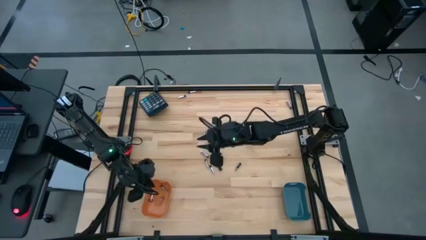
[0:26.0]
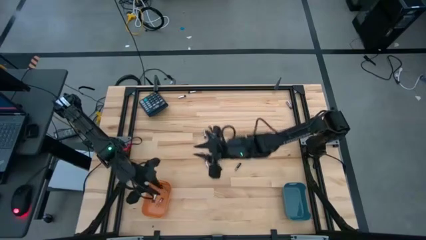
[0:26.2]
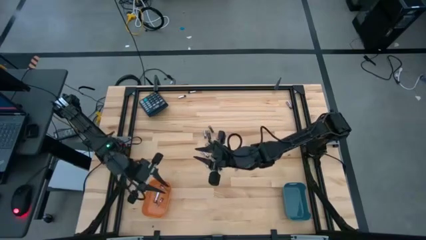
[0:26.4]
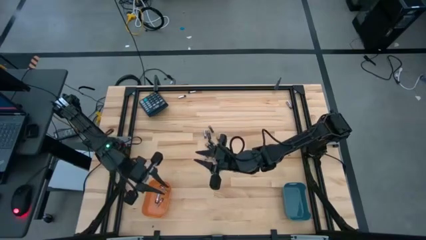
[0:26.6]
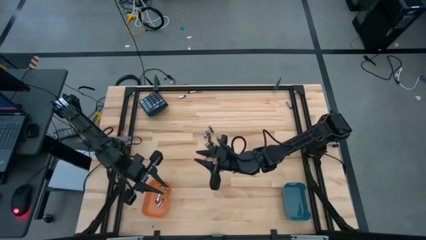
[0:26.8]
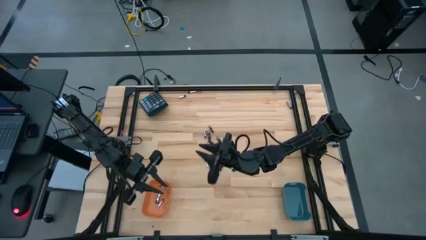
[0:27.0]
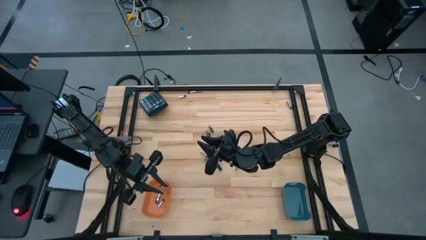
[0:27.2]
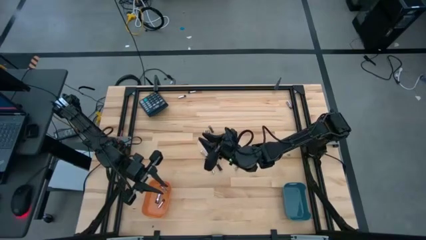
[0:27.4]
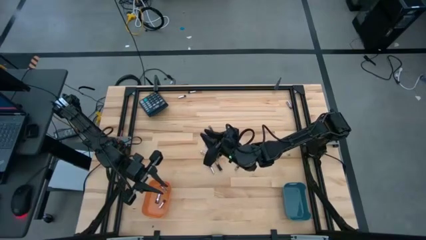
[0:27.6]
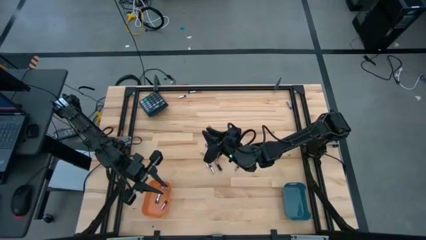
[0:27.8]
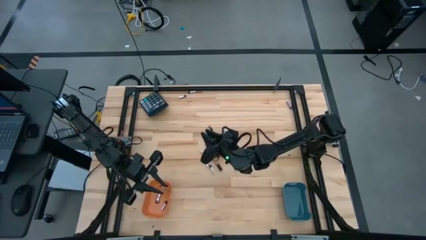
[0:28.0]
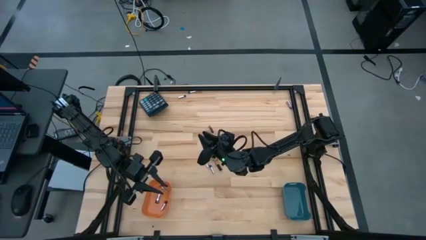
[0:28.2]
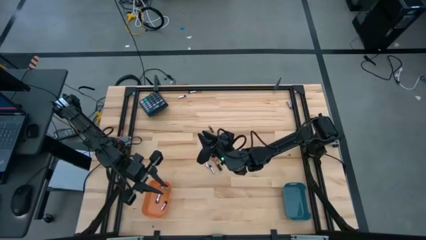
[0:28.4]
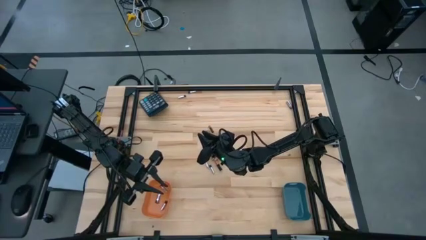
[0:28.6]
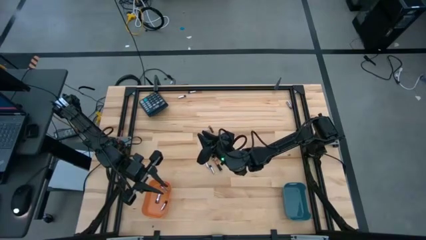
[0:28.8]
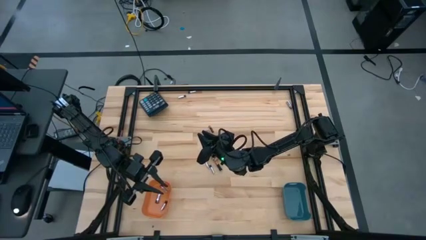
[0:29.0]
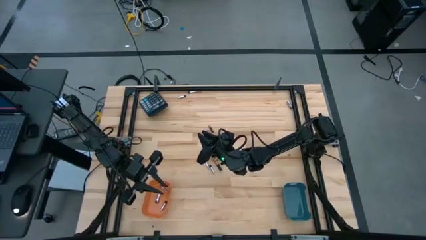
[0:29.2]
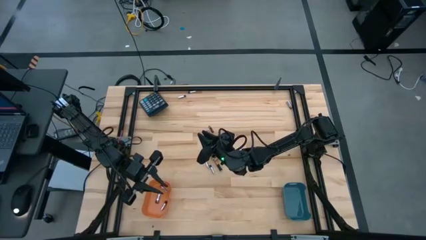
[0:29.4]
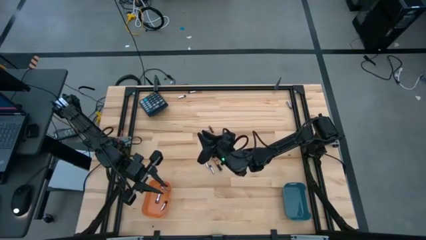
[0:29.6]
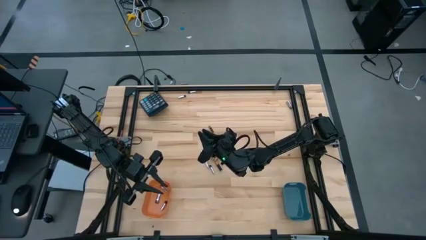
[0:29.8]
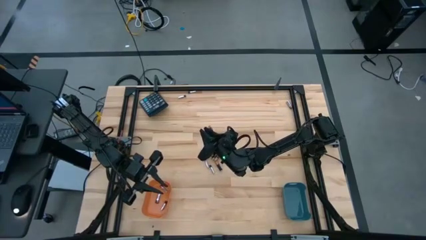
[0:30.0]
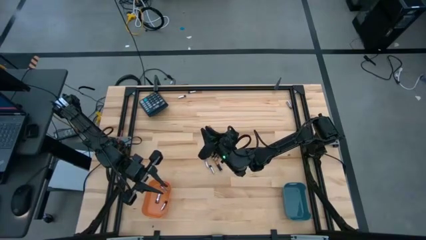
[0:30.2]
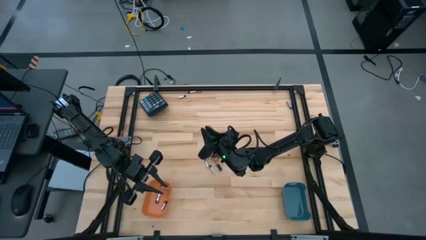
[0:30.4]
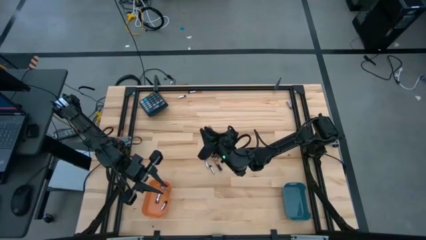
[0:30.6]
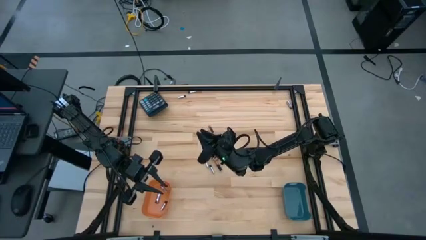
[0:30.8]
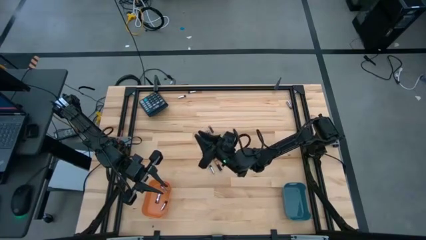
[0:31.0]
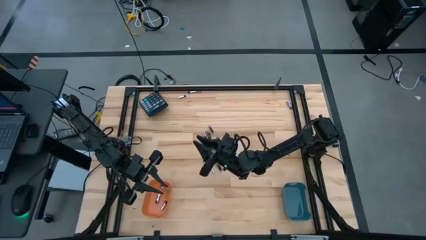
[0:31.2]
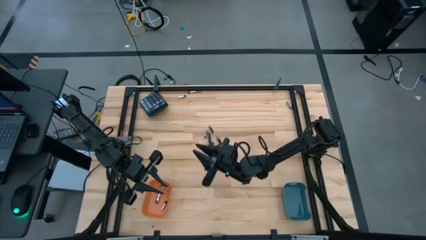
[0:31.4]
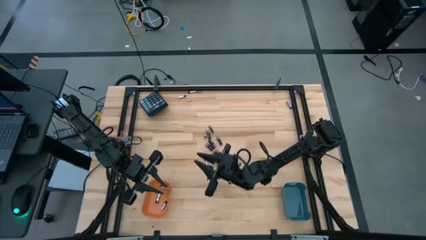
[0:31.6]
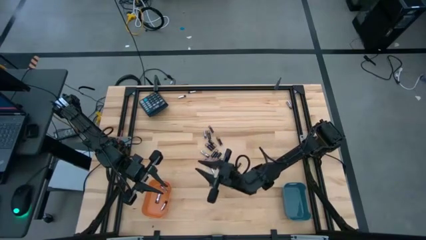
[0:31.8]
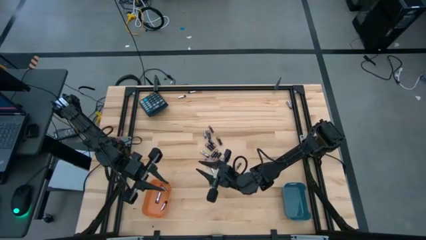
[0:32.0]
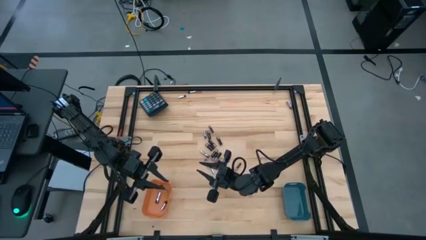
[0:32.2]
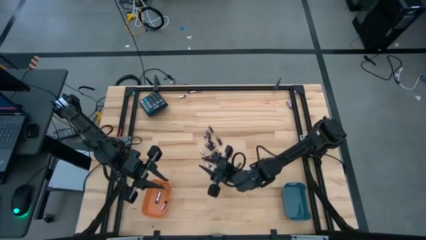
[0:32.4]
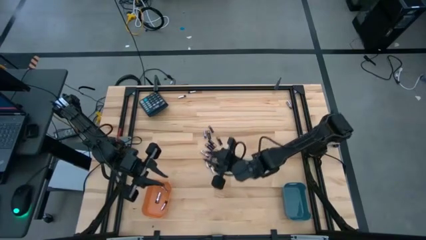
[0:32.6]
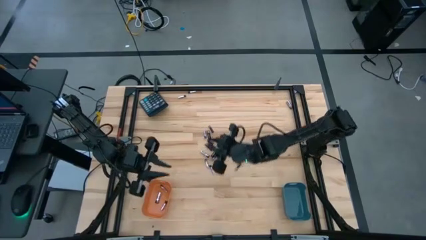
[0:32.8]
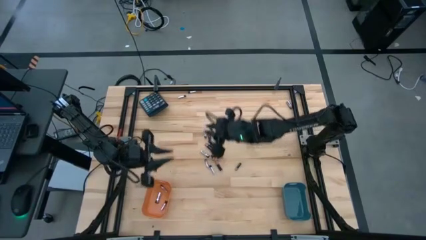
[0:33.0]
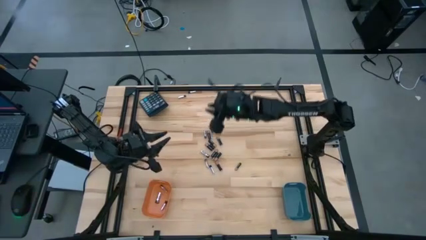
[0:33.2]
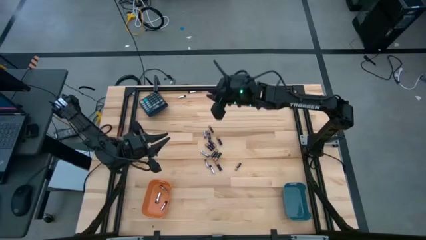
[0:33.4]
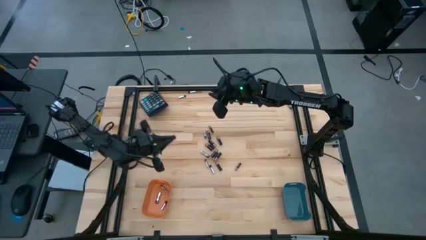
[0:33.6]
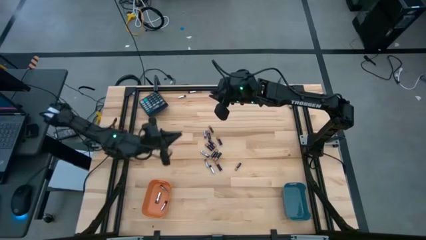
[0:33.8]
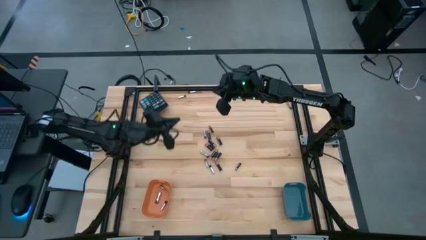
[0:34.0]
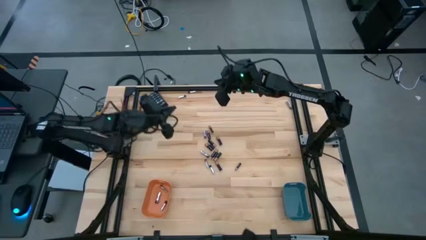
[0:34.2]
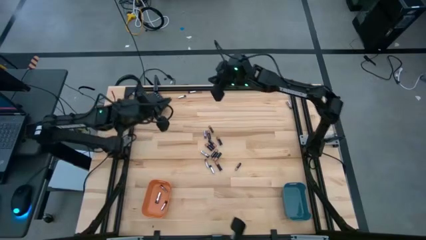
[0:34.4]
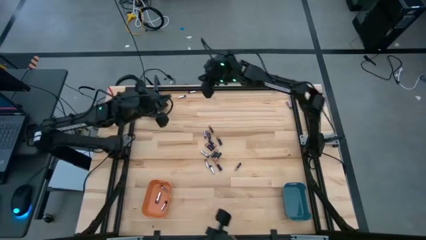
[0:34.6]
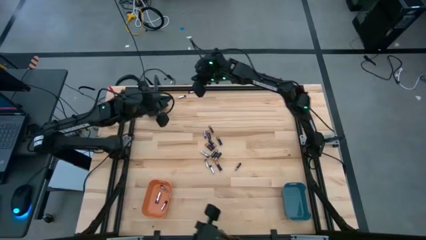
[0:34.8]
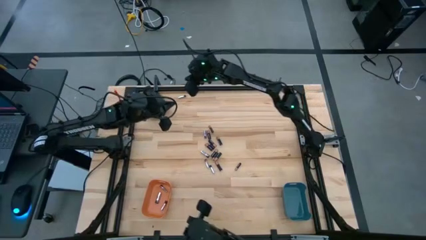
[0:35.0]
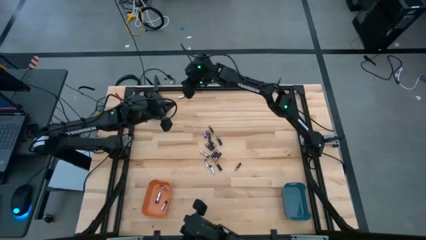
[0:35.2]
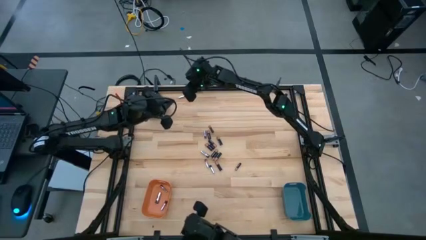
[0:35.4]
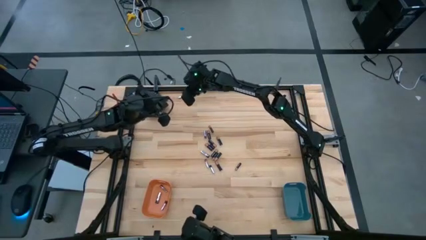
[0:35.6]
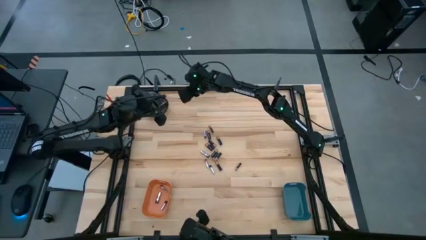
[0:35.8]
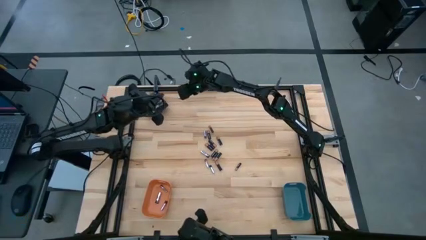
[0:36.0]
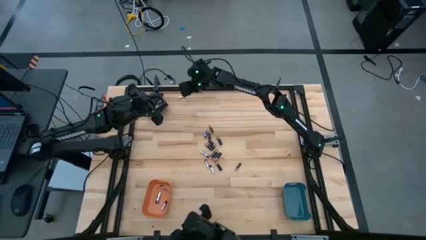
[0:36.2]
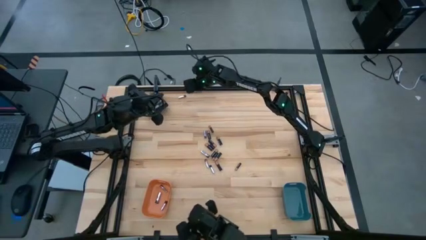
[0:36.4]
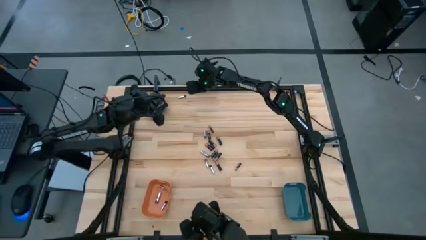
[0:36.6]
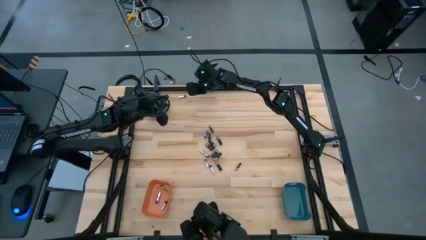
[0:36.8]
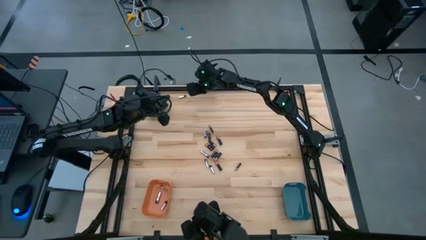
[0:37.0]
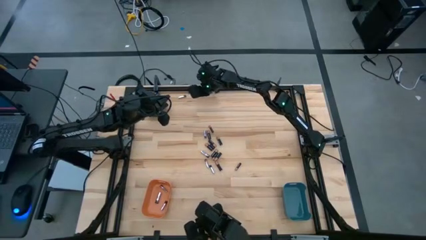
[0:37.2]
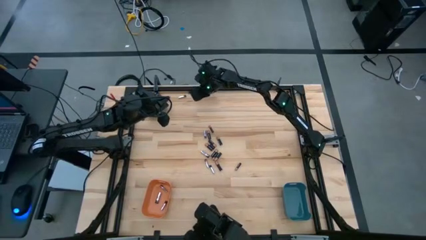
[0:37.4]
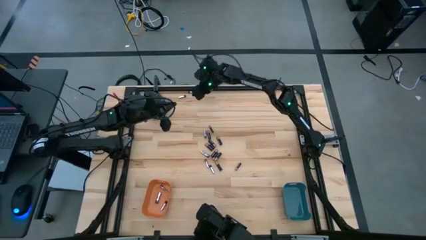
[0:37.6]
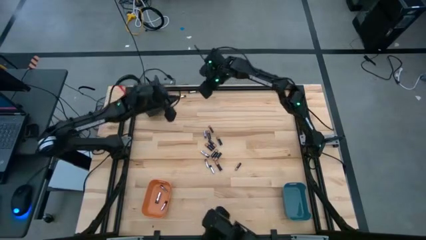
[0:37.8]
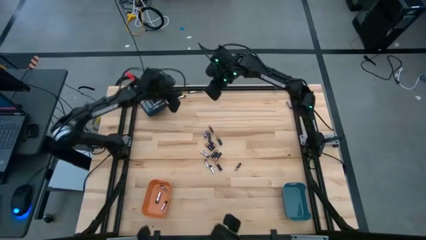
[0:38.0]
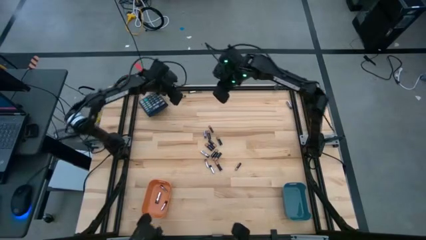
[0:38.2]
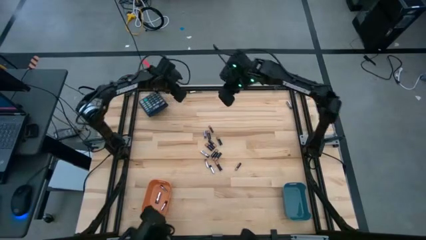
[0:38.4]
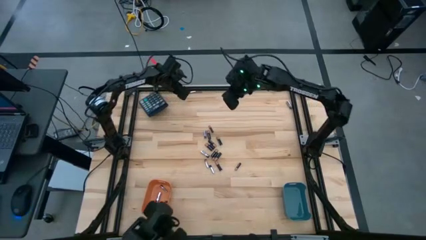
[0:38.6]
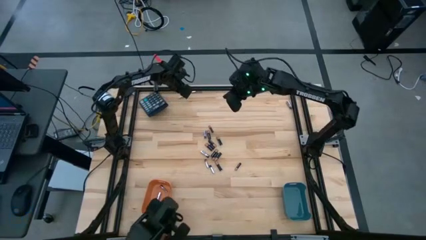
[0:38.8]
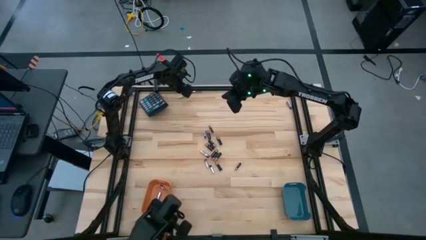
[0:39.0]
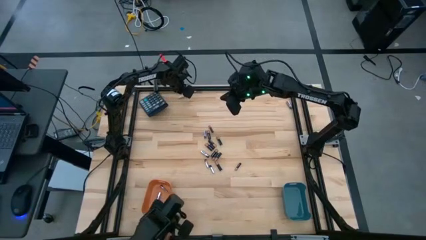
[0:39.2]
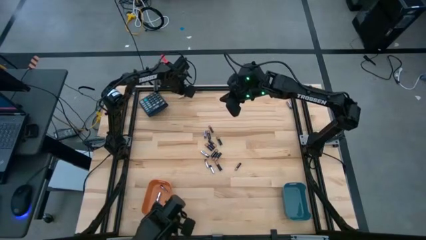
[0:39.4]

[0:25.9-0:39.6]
Task: Sort batteries
Put the silver battery into the orange bin

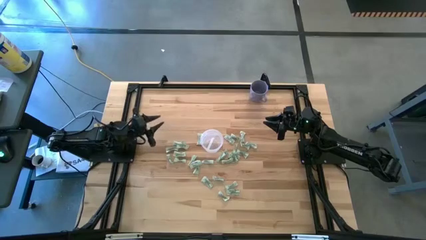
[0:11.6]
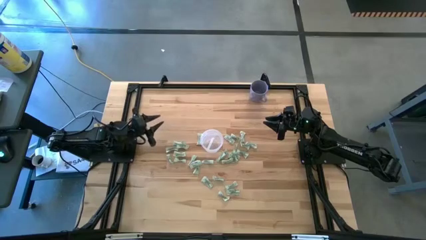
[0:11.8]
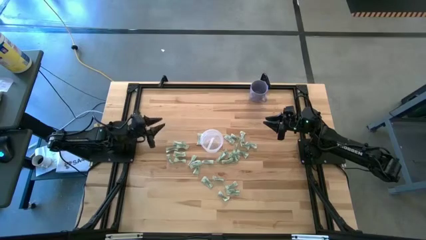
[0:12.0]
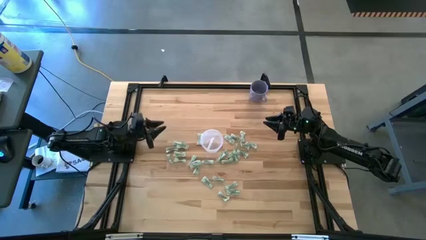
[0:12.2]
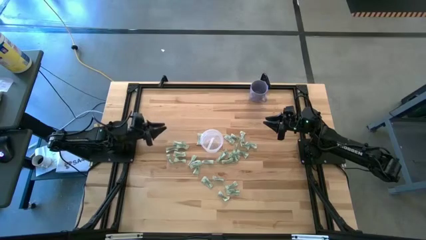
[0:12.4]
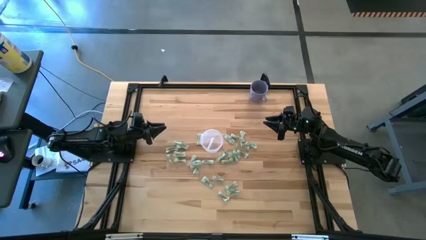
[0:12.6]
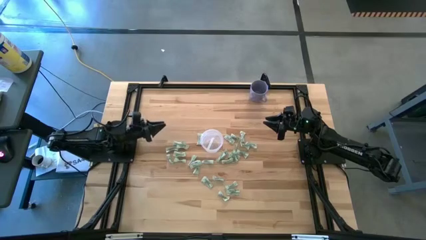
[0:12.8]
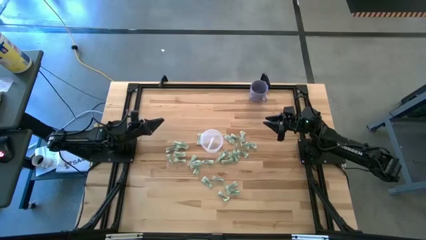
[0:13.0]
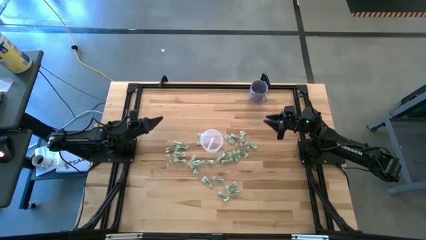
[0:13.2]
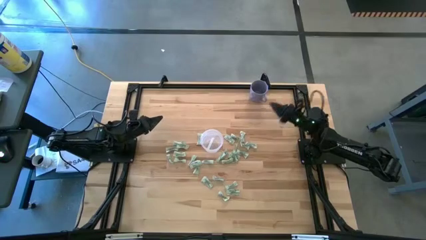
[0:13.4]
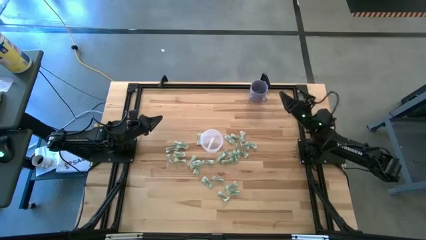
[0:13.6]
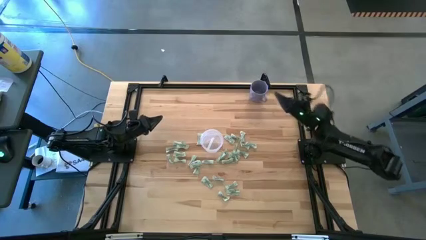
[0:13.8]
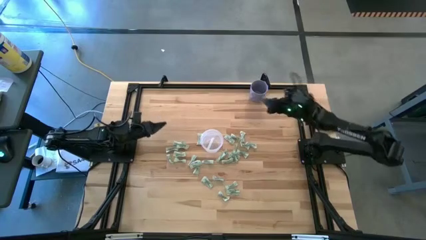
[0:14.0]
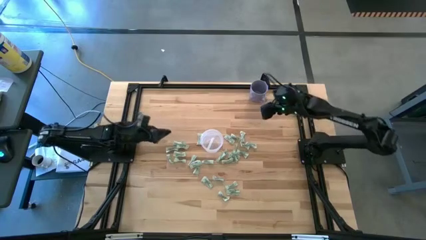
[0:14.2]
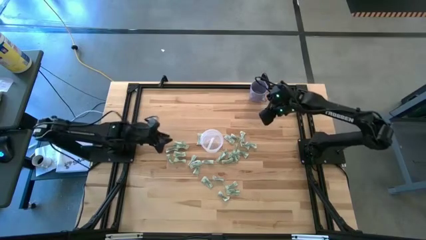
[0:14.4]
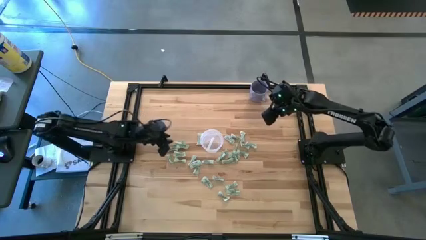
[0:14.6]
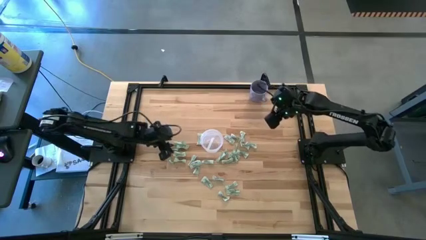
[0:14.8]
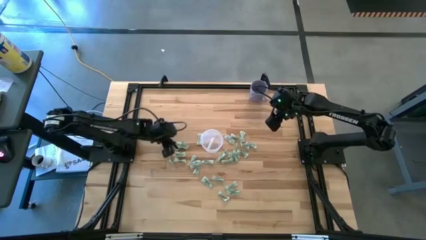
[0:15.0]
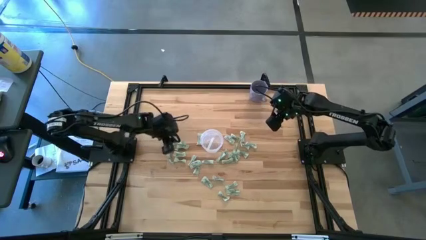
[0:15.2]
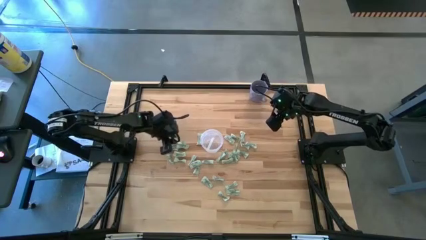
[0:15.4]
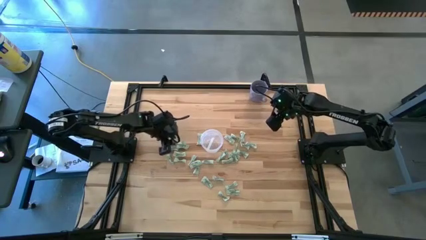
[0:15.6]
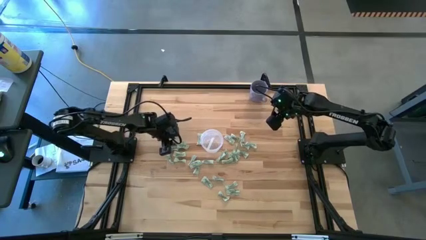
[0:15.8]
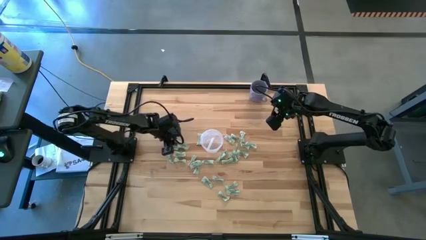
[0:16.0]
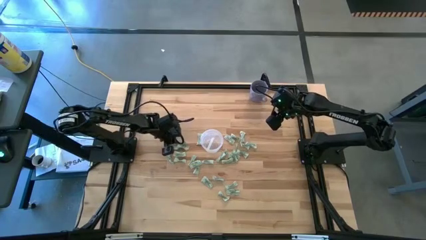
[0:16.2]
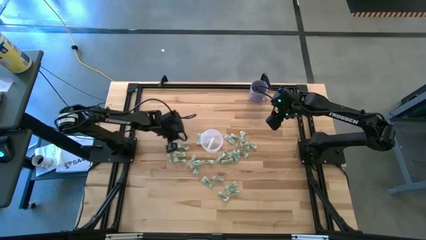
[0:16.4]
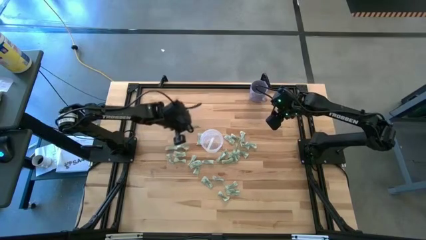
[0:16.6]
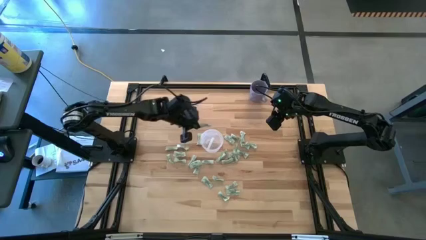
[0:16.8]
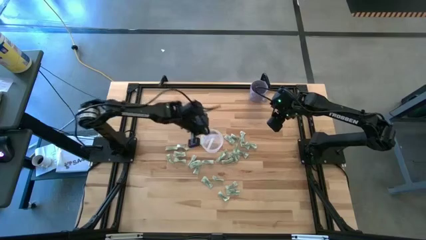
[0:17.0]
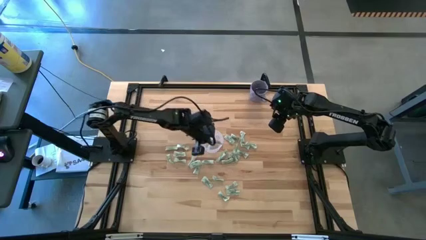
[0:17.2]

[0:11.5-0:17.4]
Task: Pick and place Stevia / Truvia into bins
Put the white stevia packet into the transparent container
